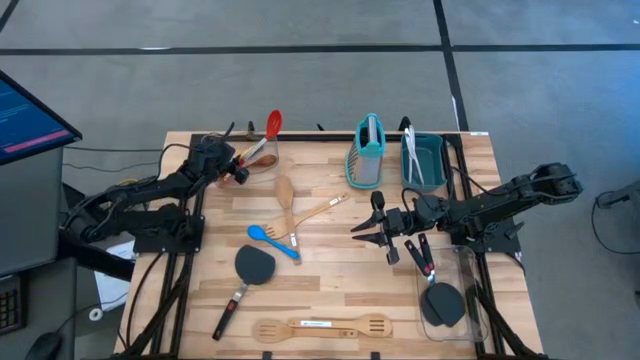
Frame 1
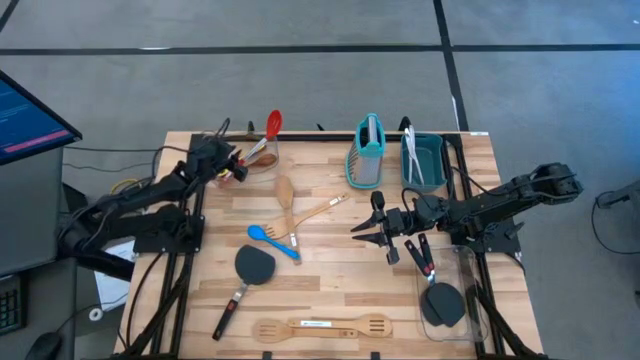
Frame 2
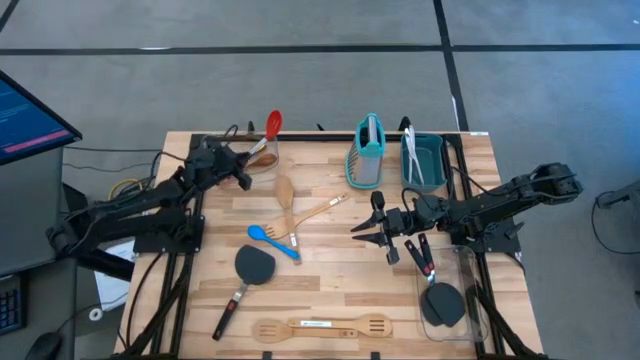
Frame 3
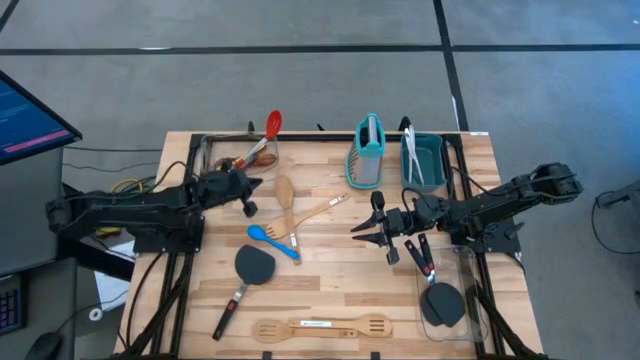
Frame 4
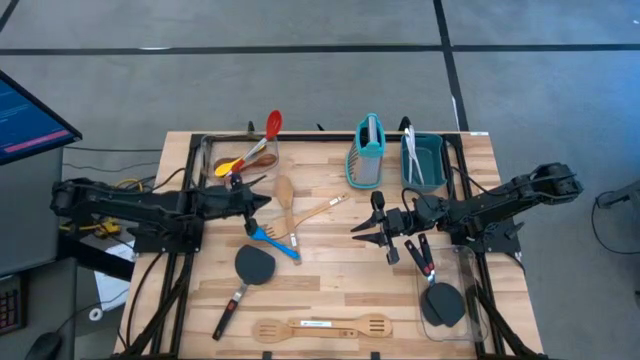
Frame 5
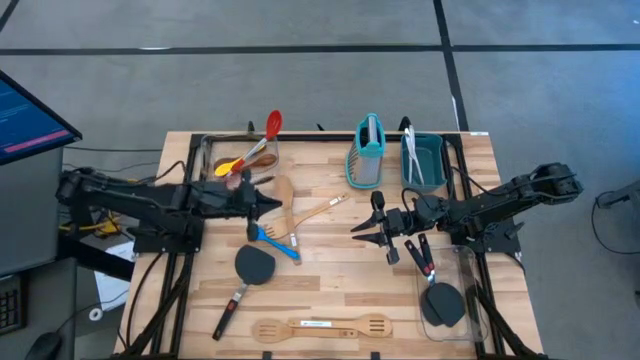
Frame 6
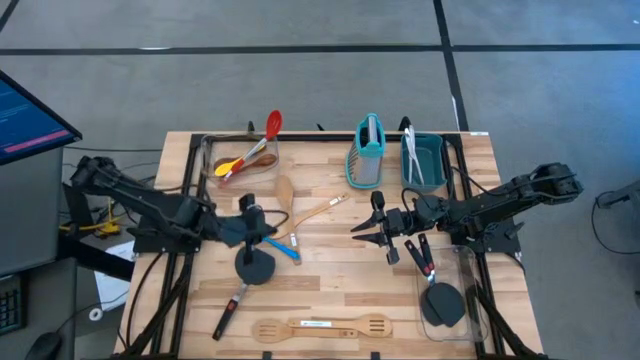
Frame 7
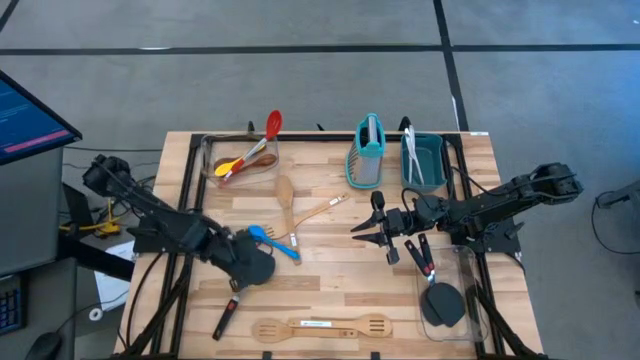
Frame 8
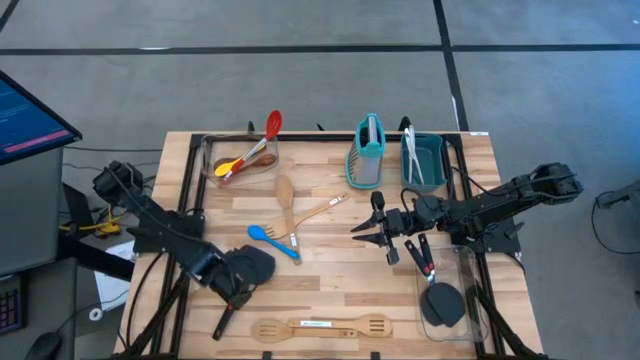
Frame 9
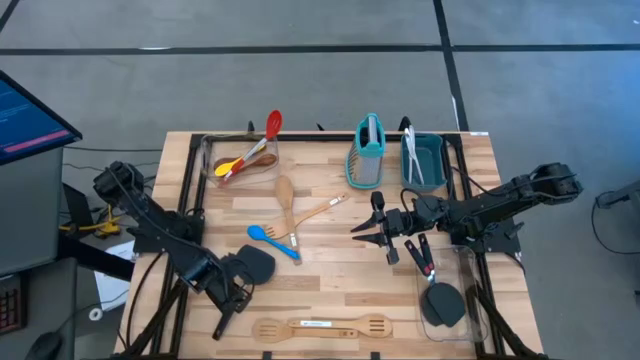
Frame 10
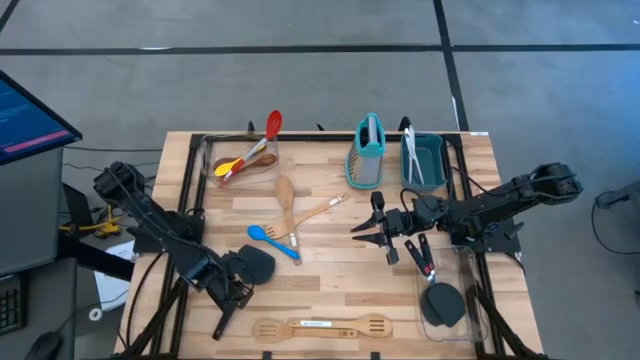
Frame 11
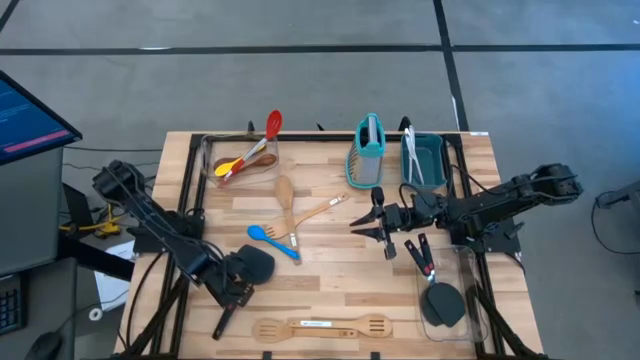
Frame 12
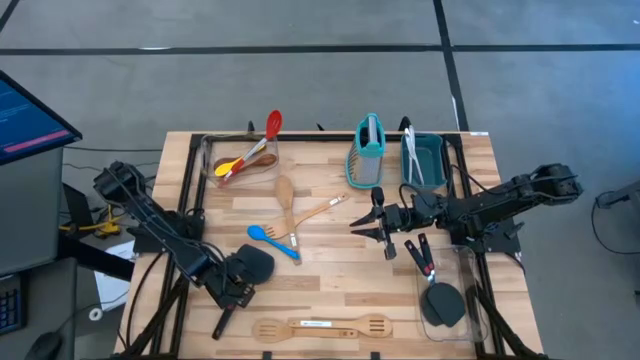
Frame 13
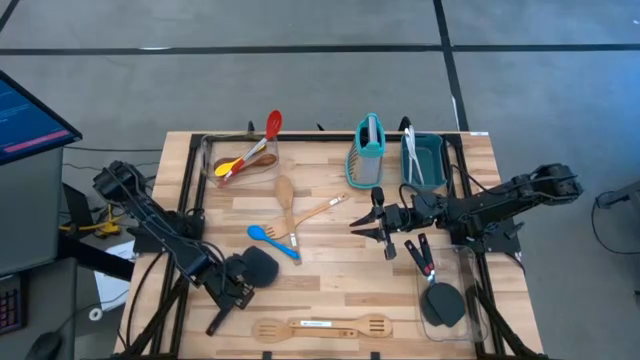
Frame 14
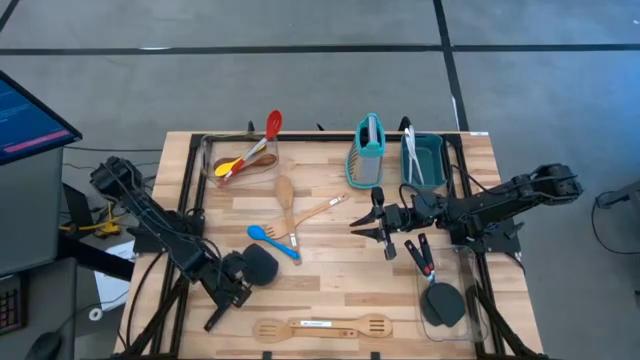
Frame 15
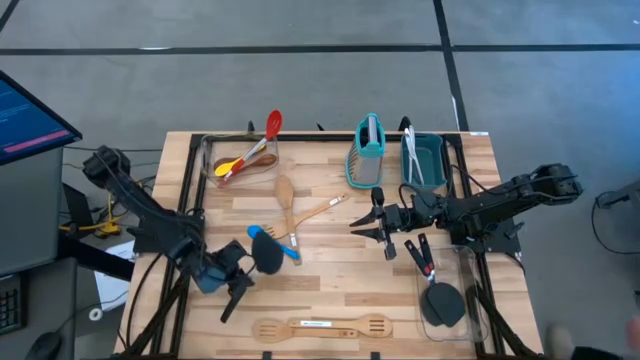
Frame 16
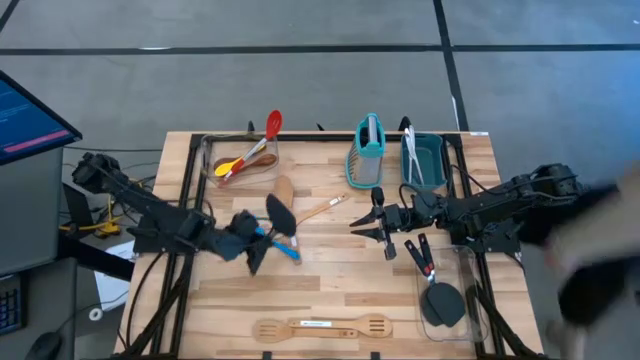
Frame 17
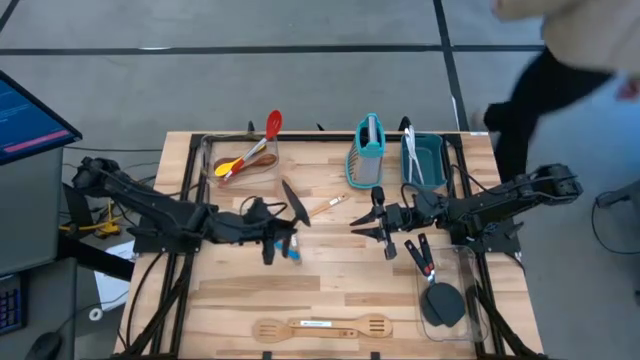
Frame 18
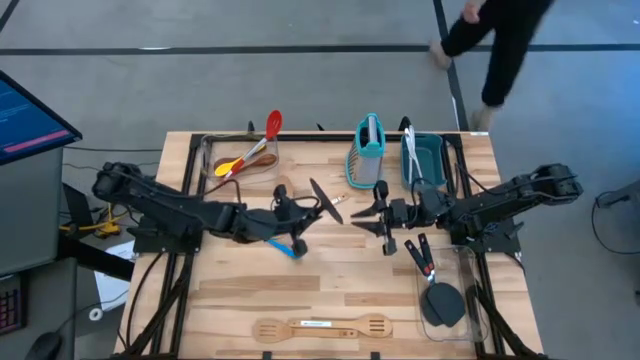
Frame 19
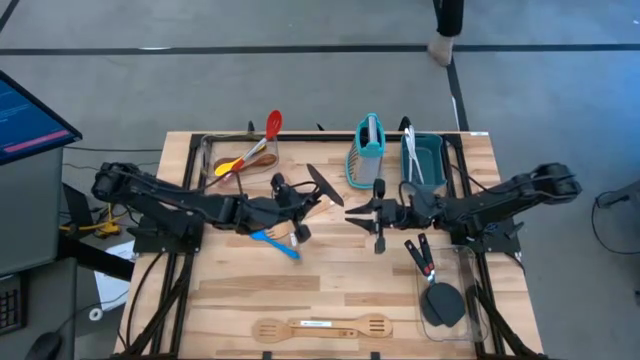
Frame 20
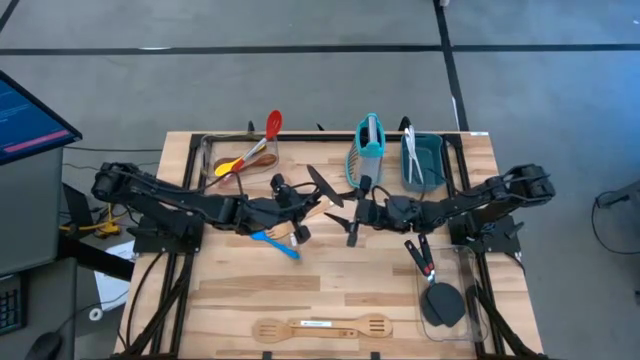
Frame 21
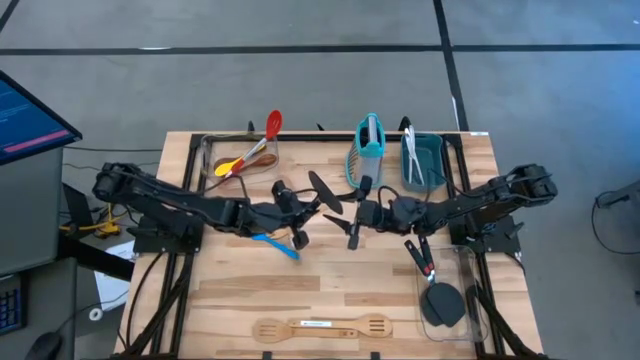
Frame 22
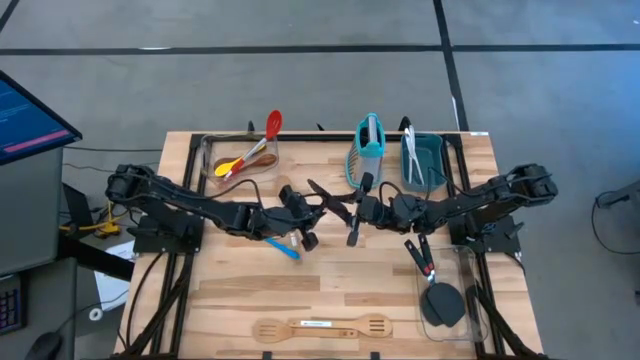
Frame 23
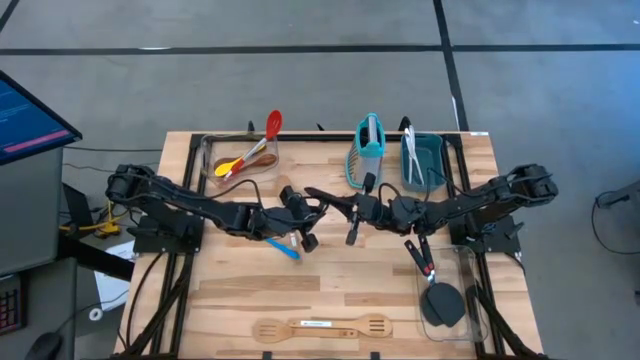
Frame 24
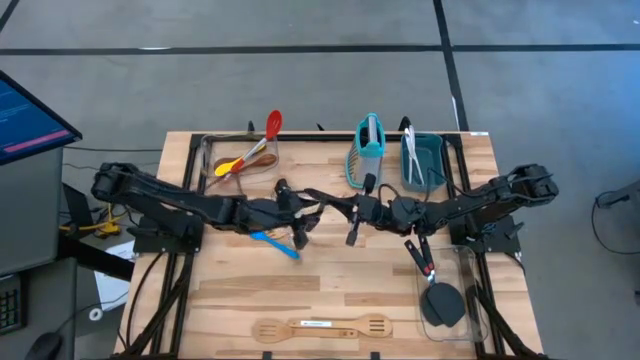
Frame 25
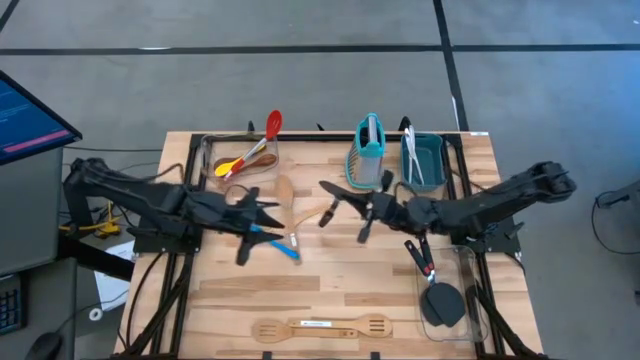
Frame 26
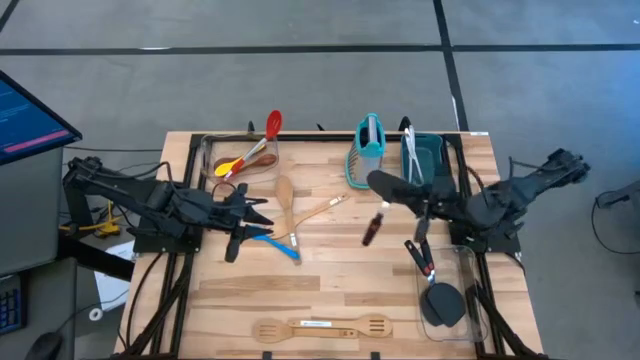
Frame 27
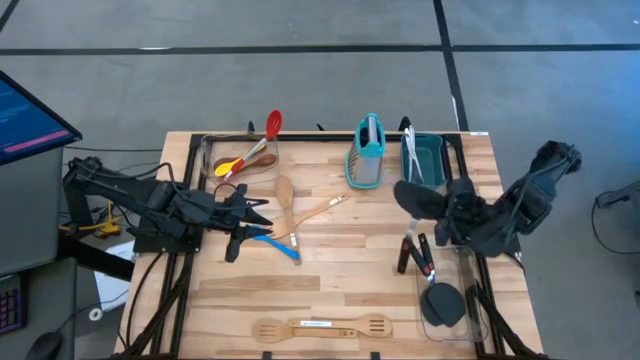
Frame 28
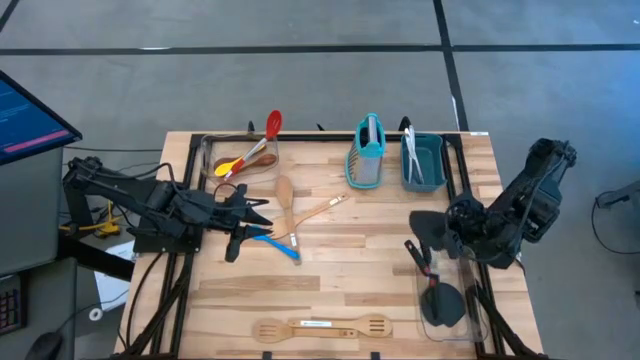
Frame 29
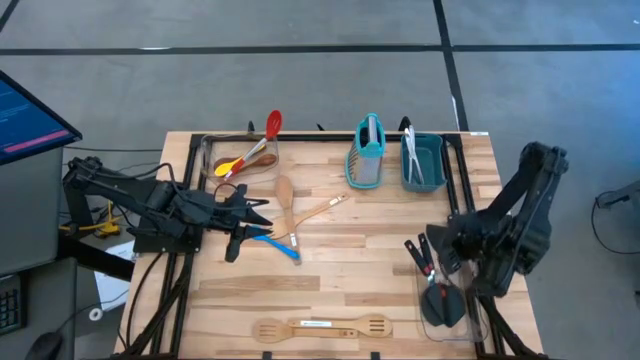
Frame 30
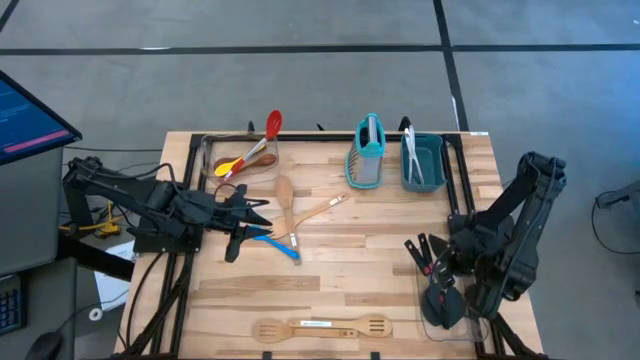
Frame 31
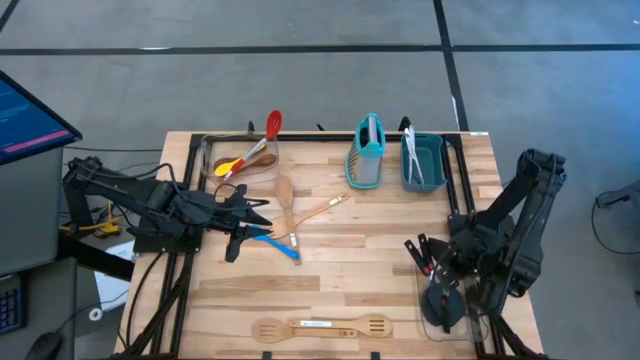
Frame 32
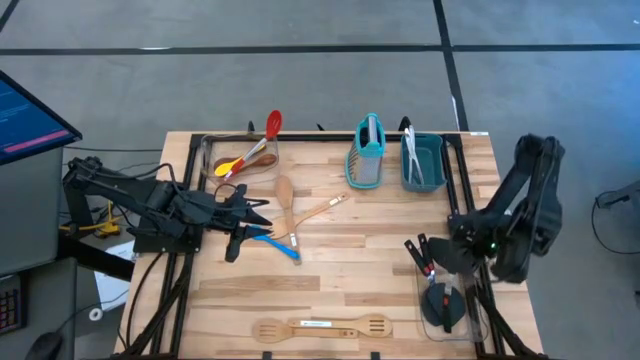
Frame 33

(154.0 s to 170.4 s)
Task: Pick & Place Kitchen Items
Put the black turner spatula into the right transparent bin

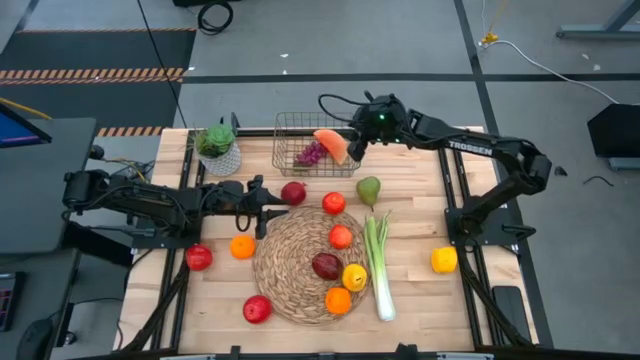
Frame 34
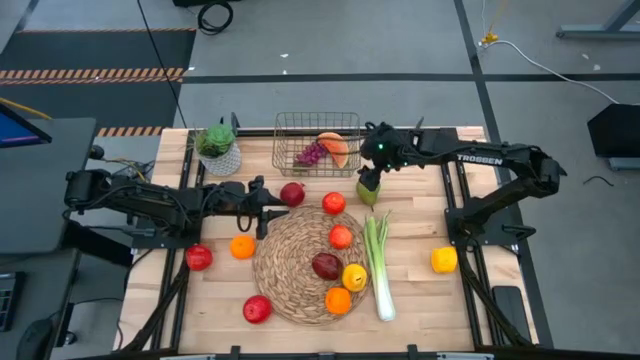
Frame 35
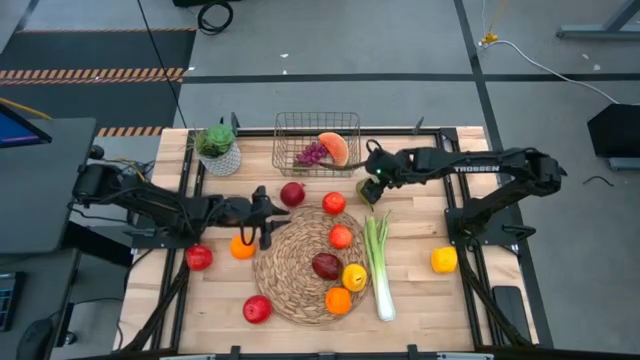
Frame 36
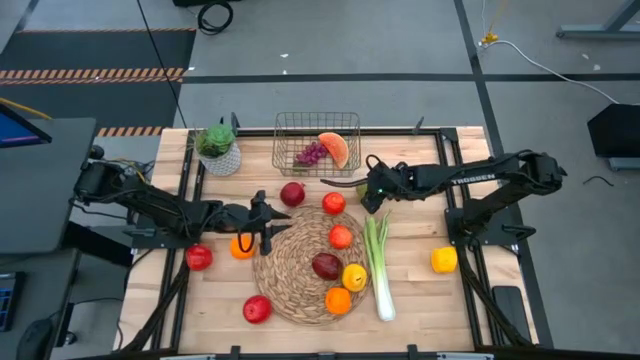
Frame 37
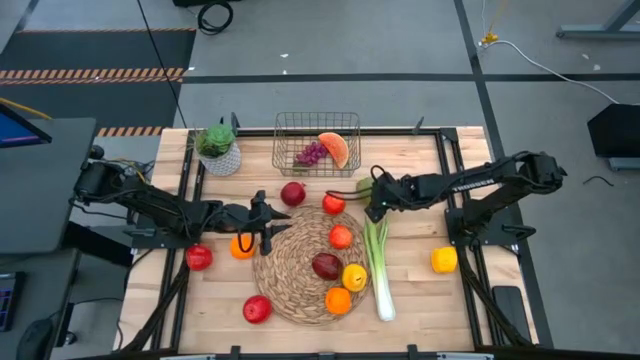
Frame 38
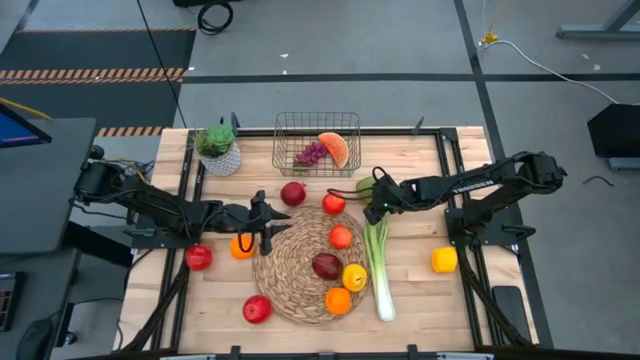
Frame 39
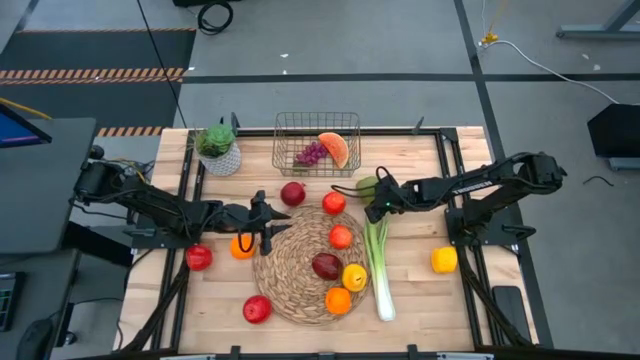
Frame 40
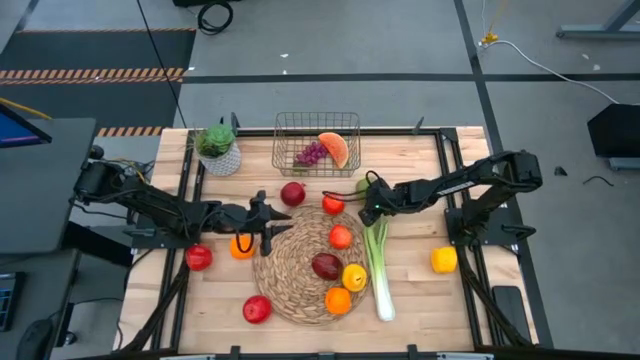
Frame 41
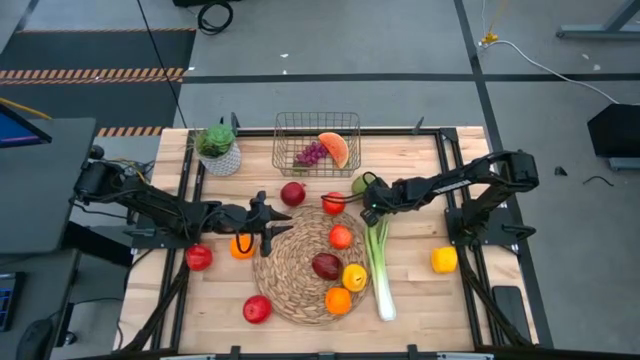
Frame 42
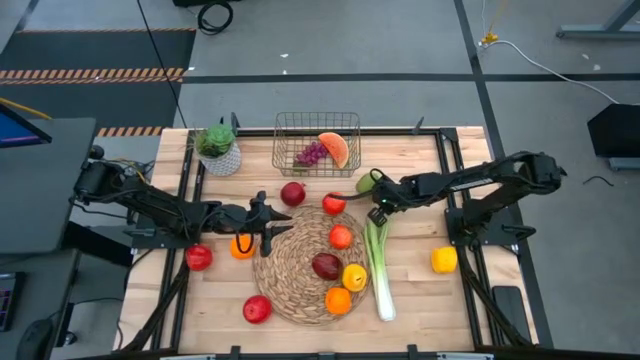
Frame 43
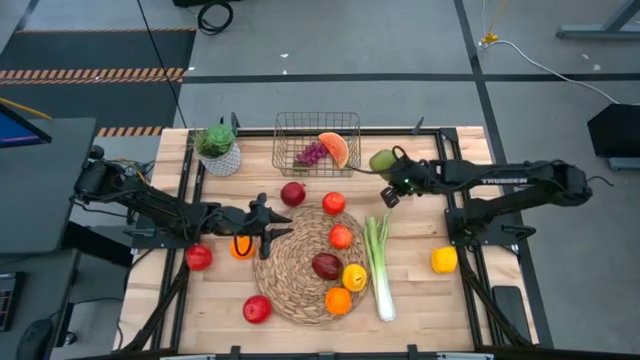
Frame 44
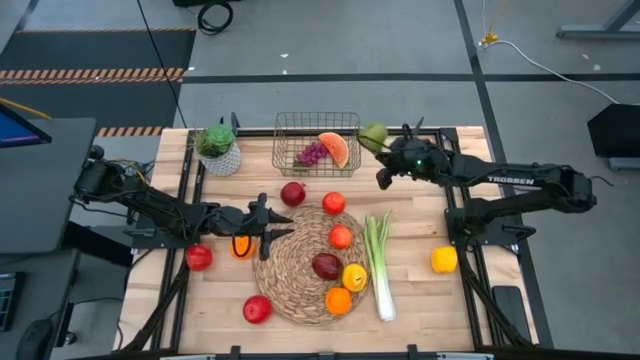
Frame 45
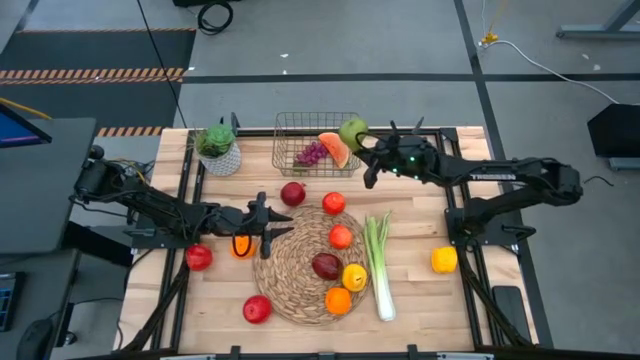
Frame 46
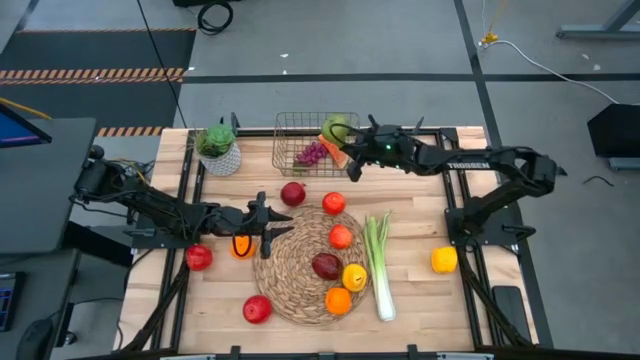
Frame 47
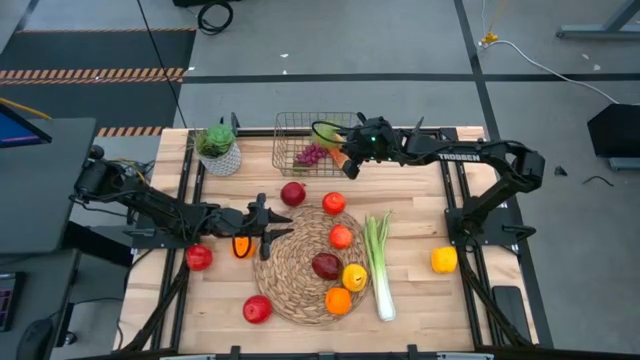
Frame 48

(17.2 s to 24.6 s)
Task: Build produce basket
Put the green pear into the wire basket
